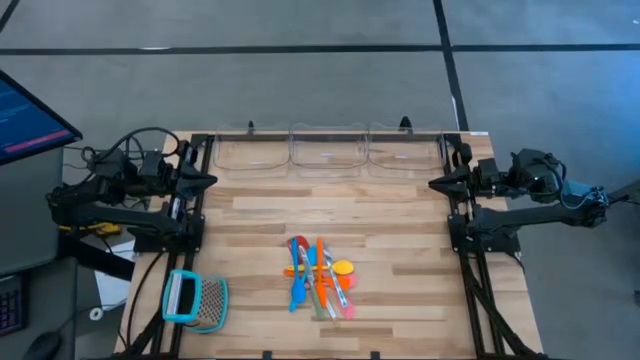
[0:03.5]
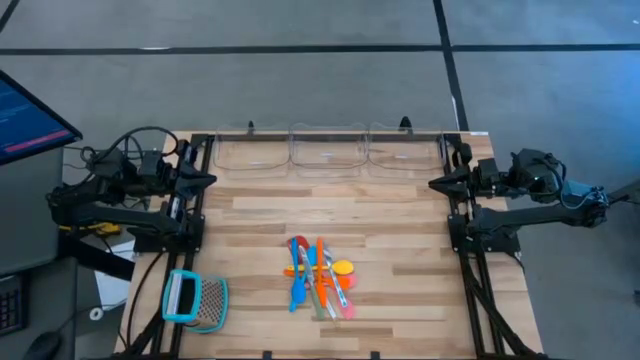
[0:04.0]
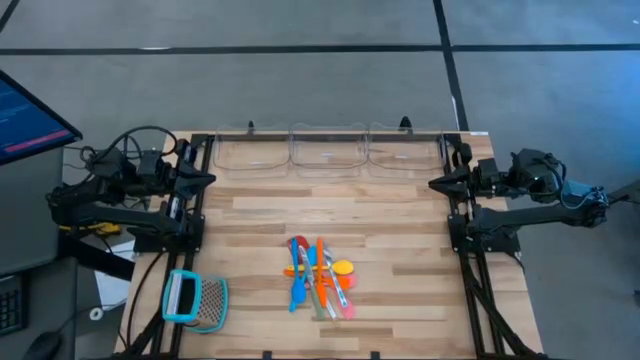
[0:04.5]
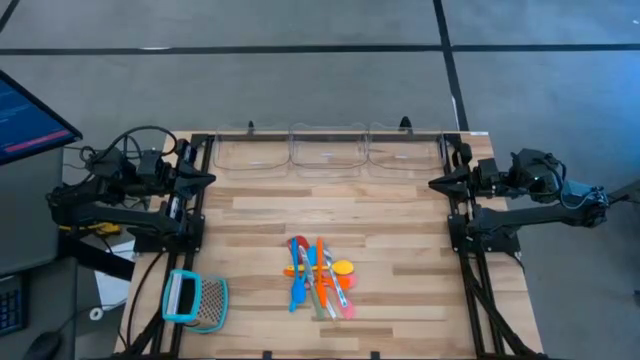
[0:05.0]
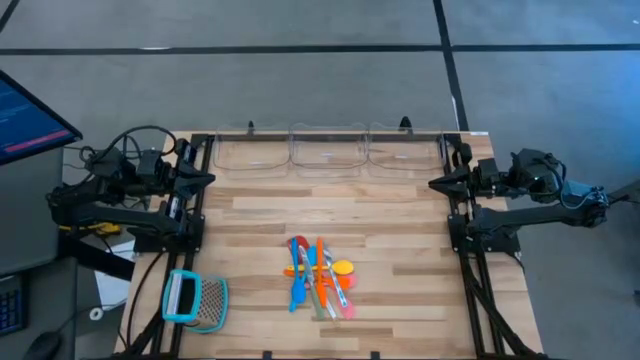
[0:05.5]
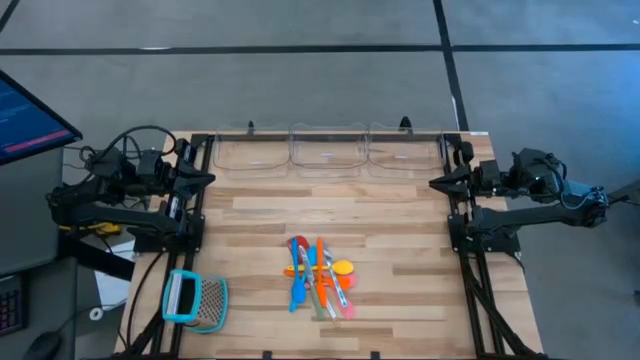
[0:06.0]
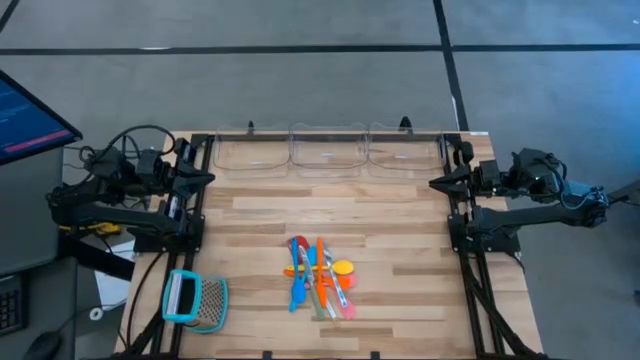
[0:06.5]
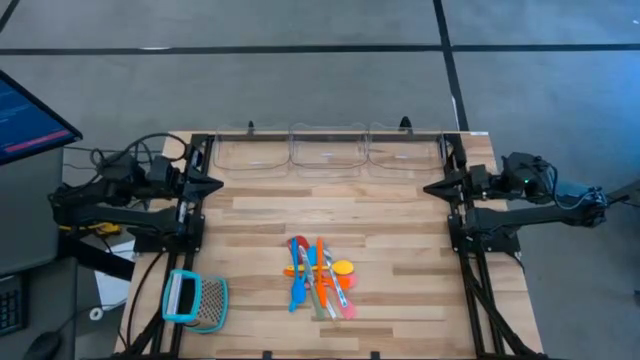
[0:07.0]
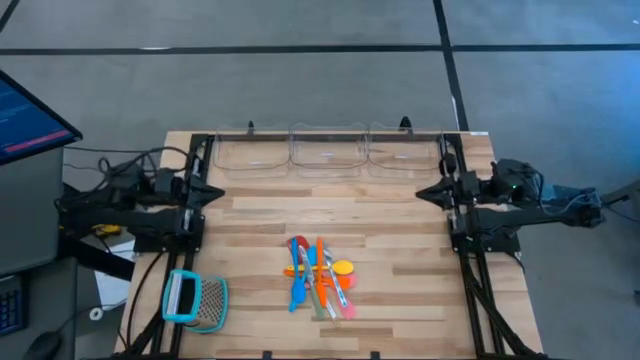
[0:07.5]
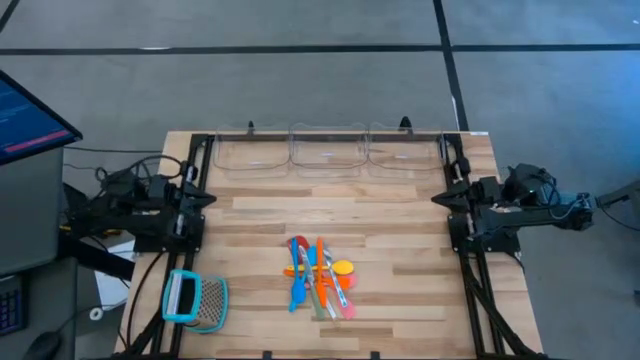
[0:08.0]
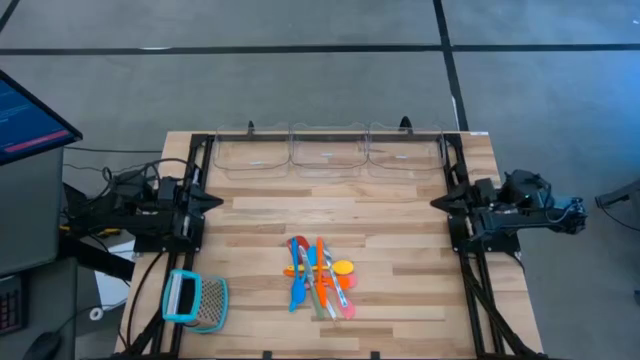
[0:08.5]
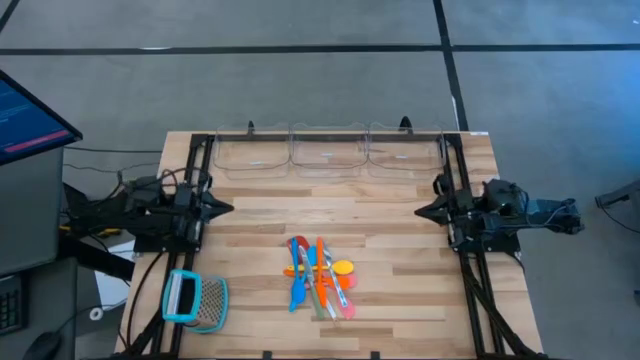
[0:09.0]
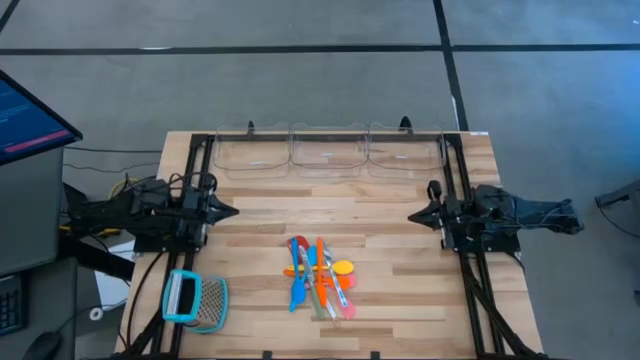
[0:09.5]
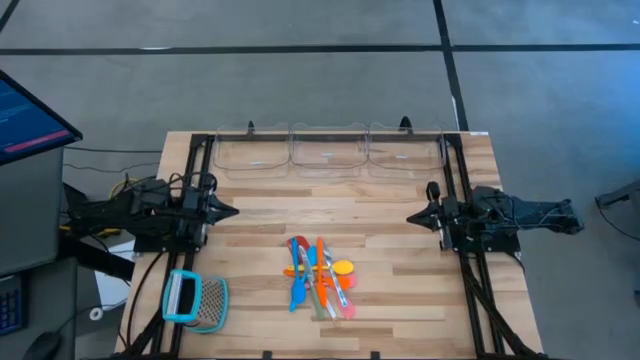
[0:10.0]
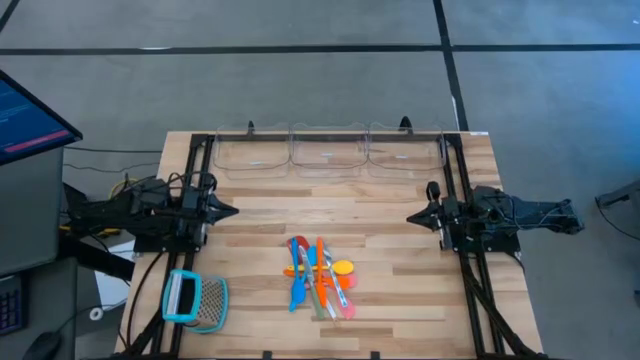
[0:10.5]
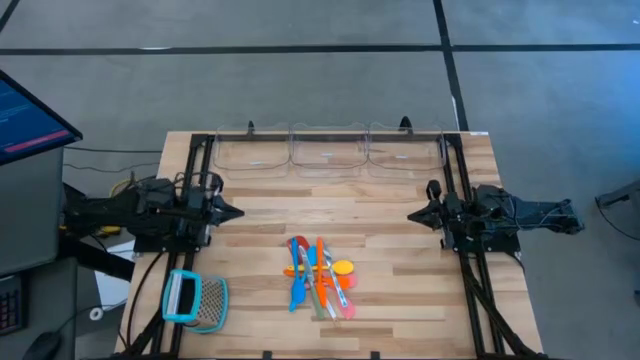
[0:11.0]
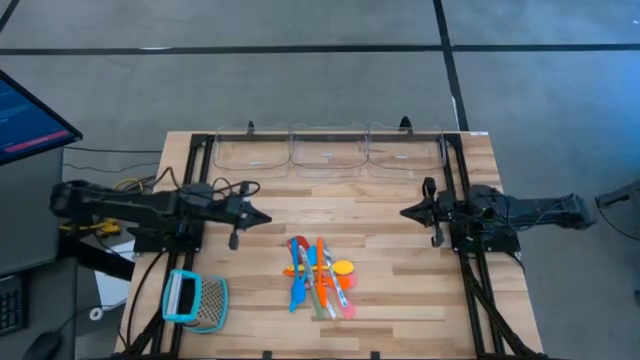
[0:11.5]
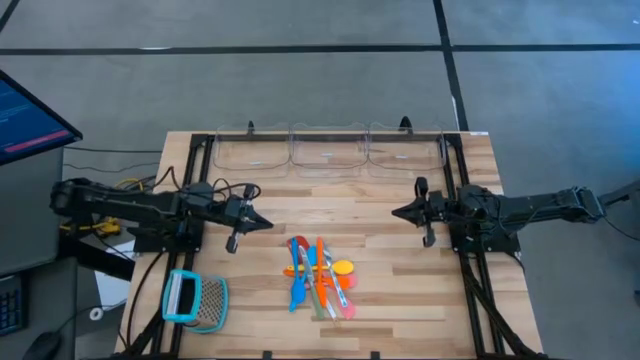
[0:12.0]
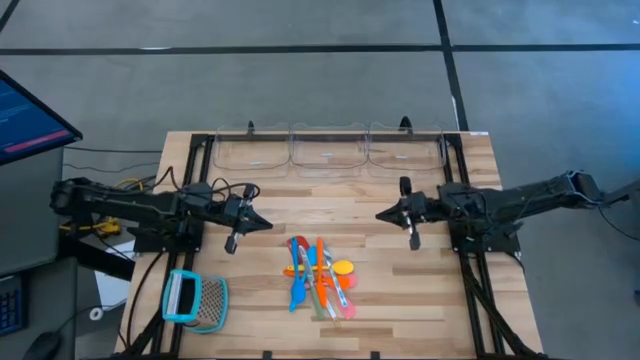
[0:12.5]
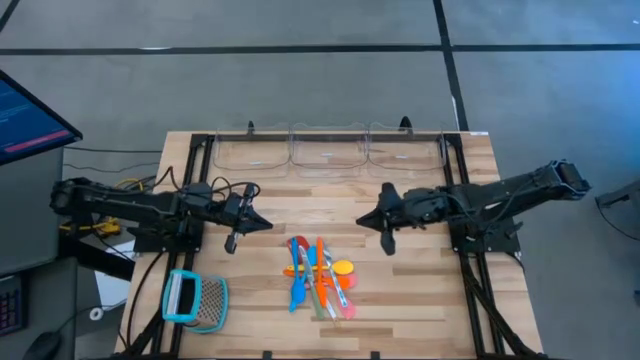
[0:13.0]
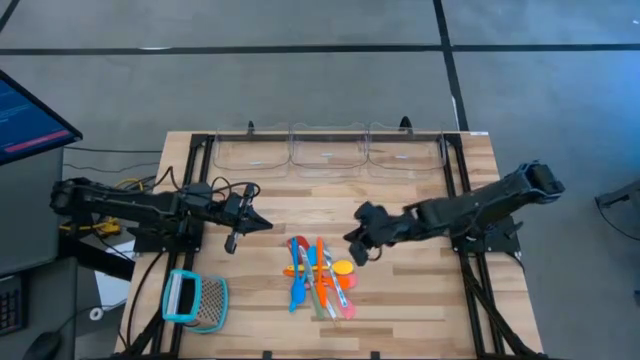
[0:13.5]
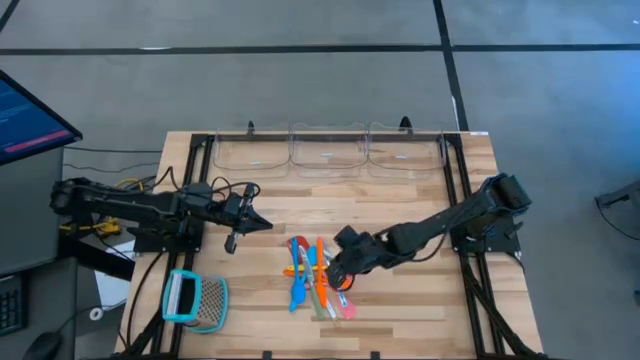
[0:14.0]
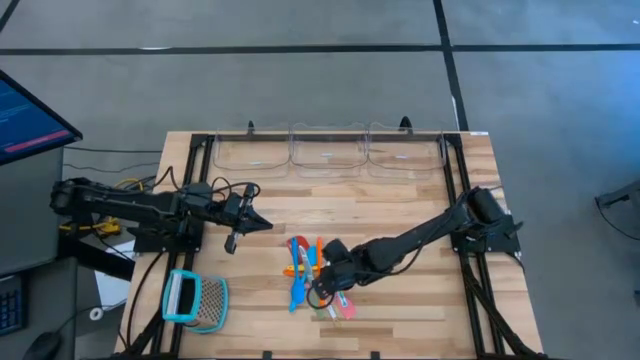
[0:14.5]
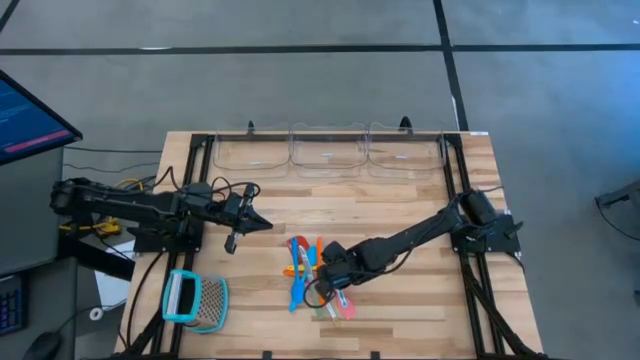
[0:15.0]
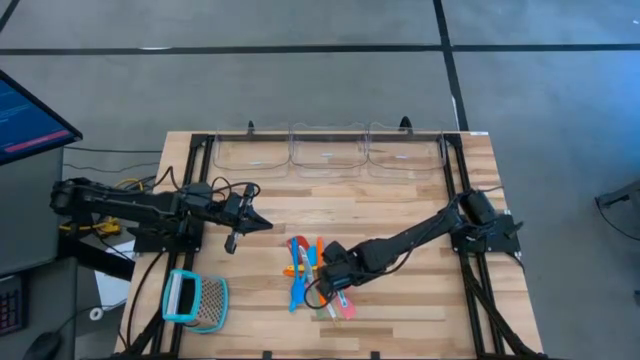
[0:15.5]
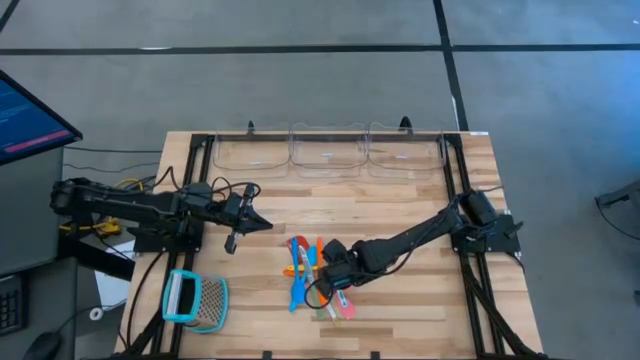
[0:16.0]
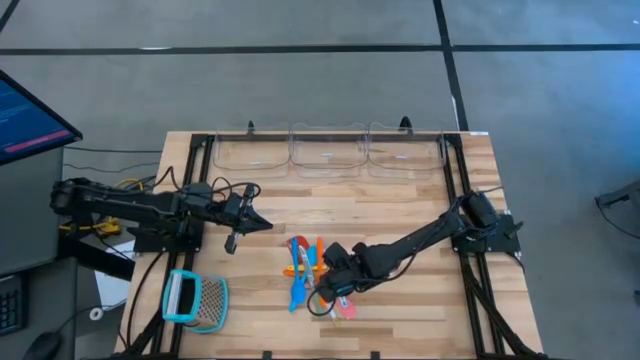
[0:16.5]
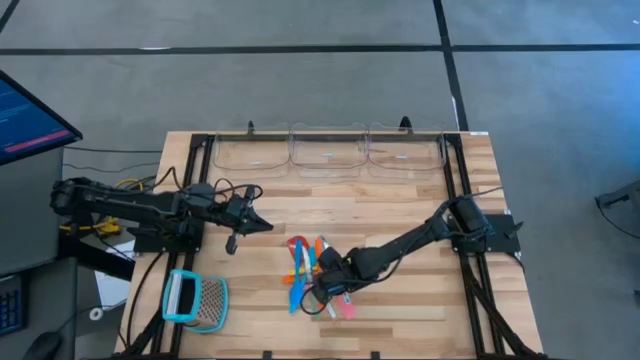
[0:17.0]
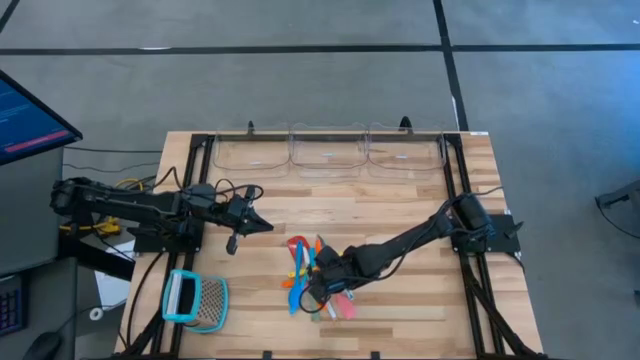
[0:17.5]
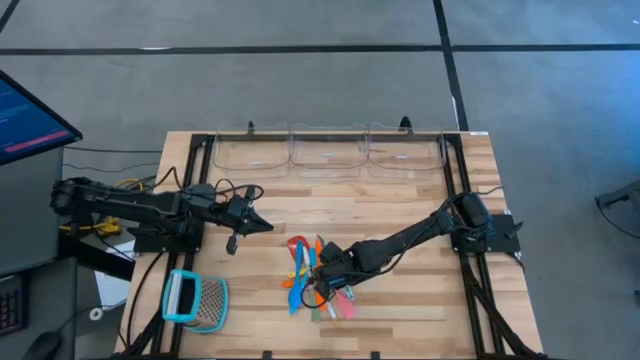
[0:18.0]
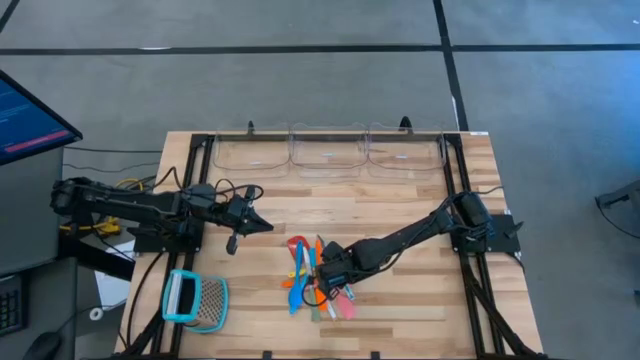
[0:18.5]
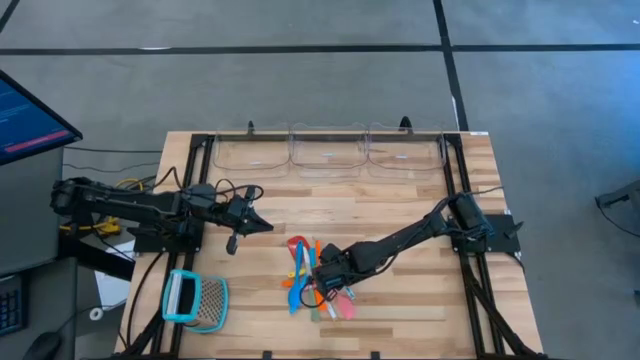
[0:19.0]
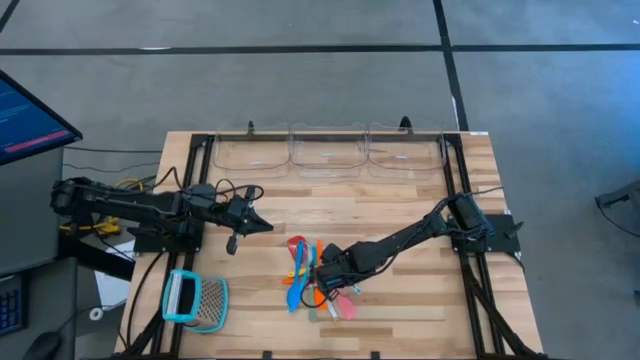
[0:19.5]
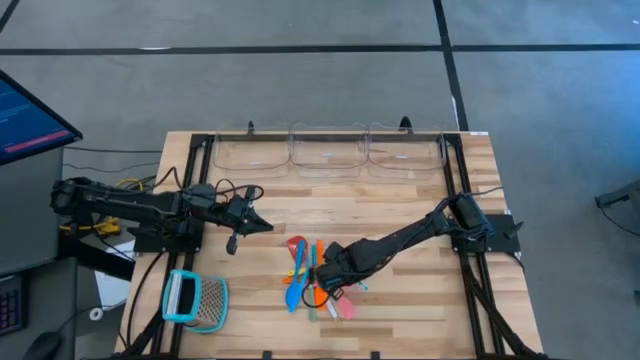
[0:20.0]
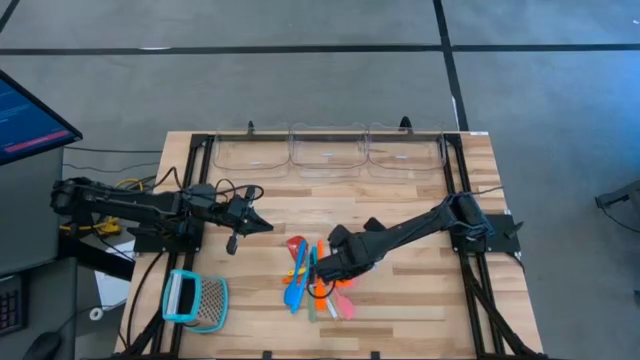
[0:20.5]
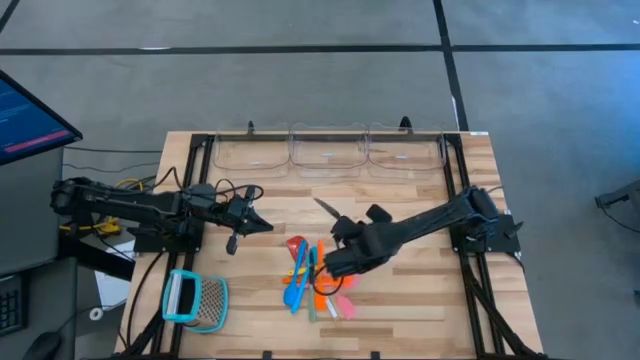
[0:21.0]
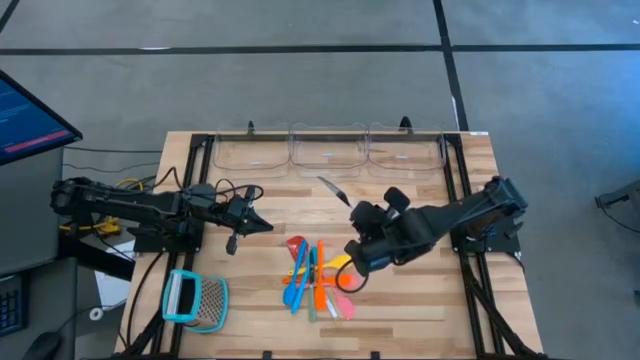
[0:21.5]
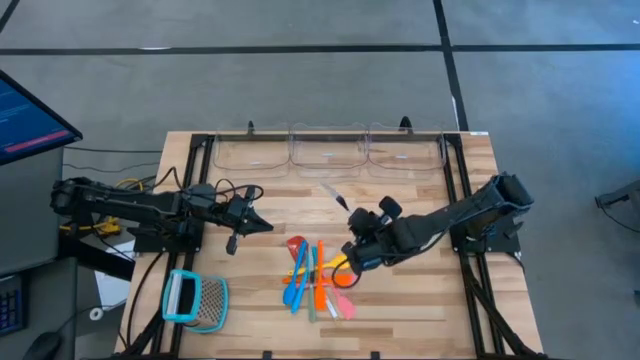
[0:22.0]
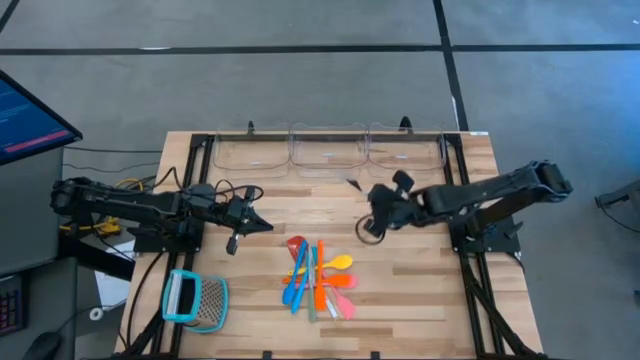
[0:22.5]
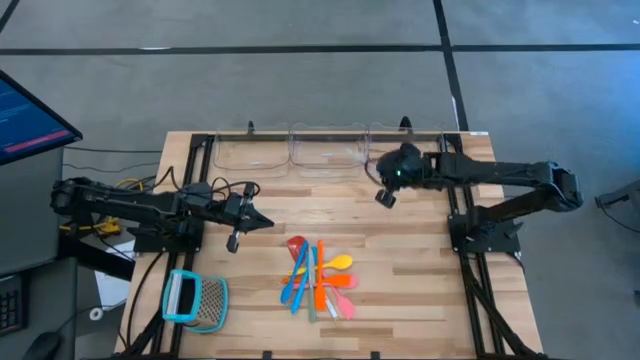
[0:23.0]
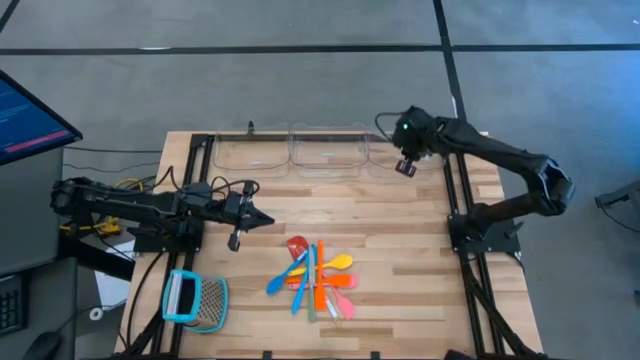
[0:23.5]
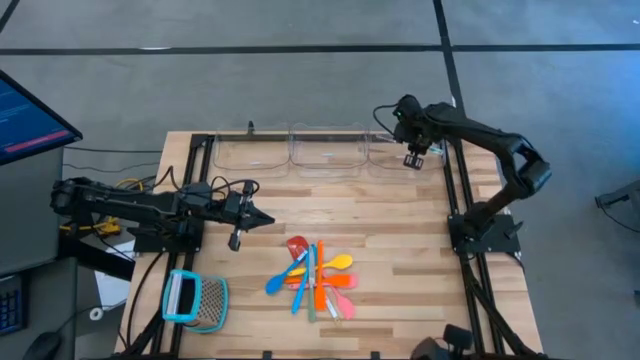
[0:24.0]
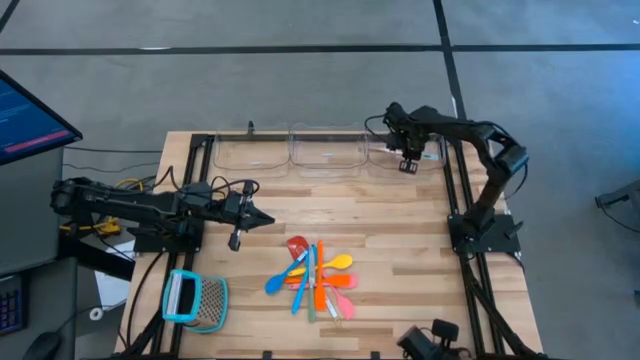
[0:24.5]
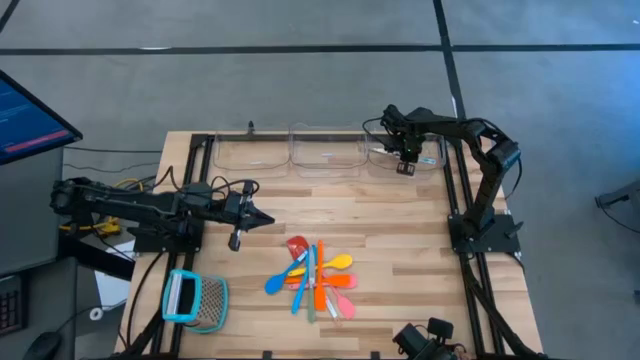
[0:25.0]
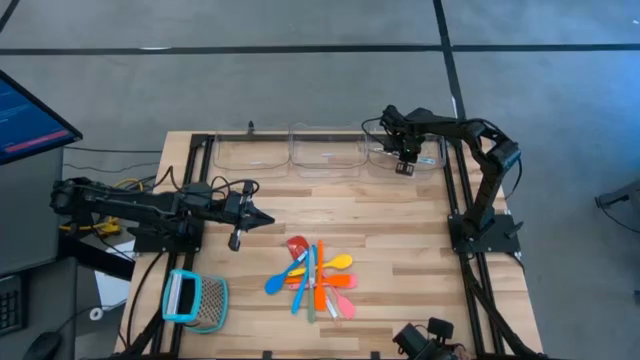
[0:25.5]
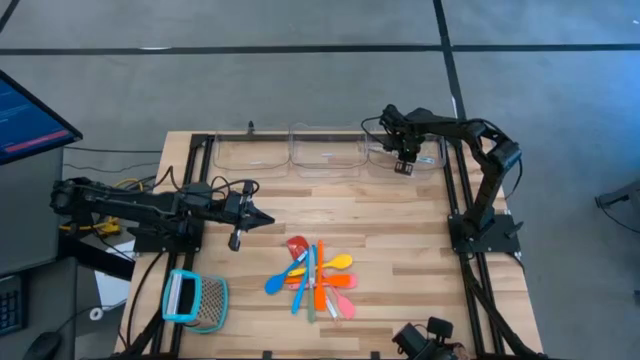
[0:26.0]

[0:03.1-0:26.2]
Task: Pick & Place Kitchen Items
Put the white patterned table knife into the right transparent bin
